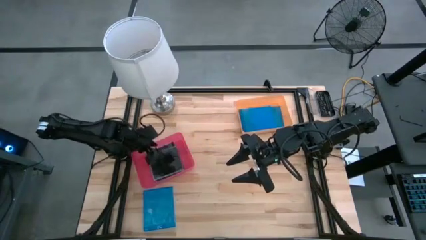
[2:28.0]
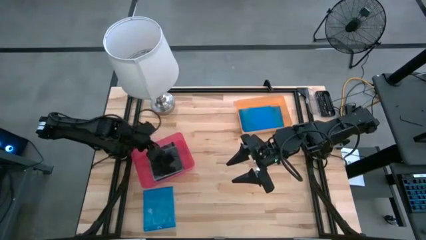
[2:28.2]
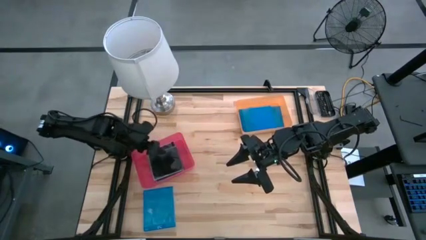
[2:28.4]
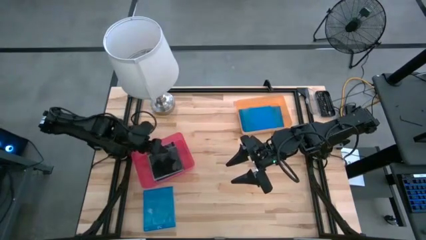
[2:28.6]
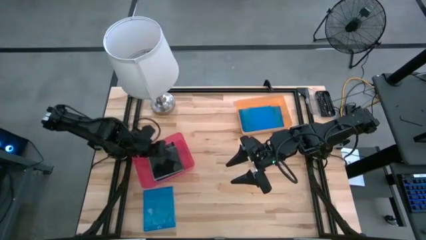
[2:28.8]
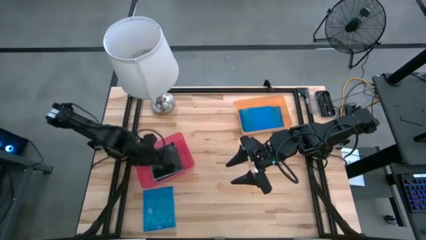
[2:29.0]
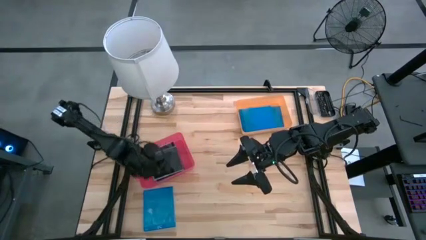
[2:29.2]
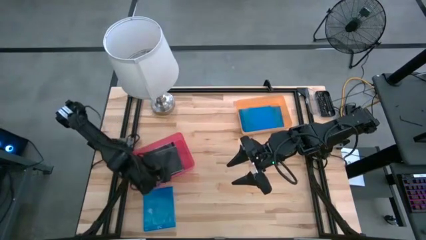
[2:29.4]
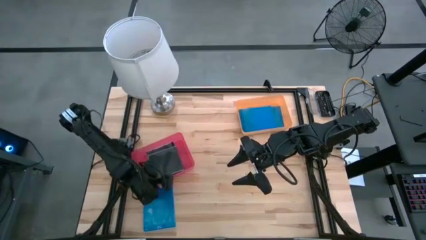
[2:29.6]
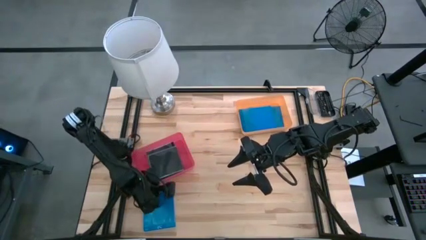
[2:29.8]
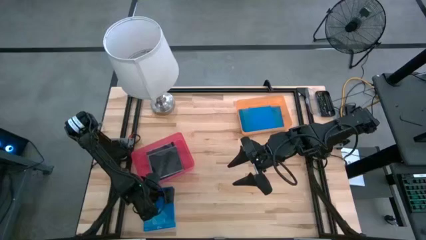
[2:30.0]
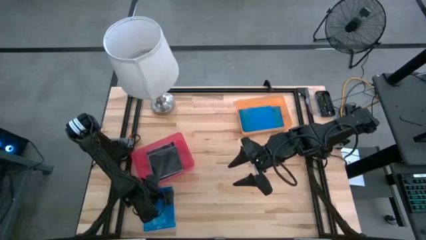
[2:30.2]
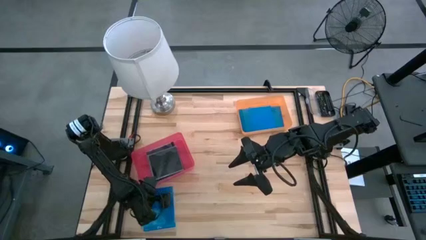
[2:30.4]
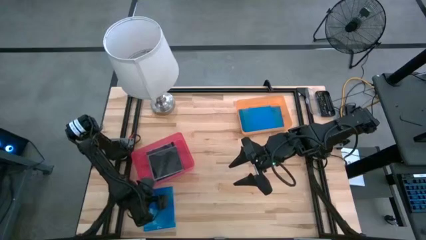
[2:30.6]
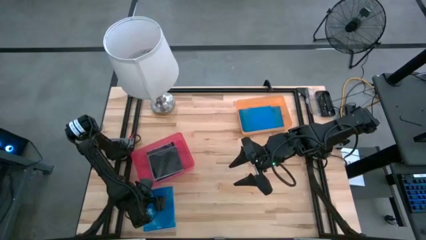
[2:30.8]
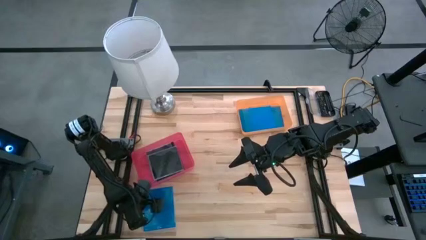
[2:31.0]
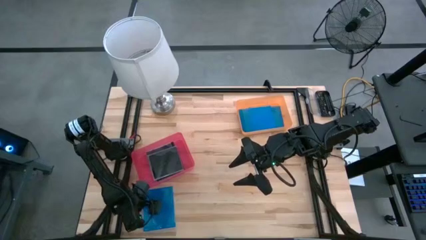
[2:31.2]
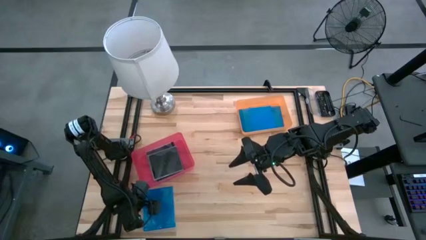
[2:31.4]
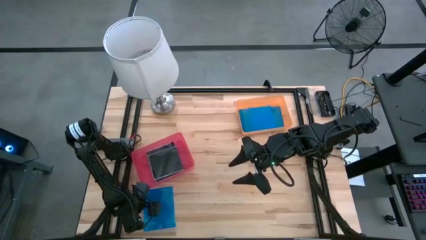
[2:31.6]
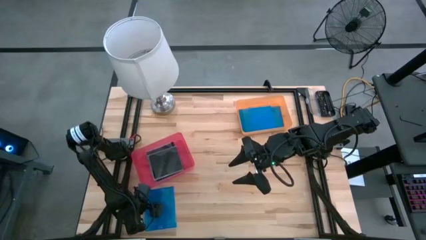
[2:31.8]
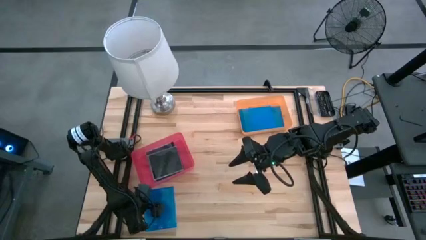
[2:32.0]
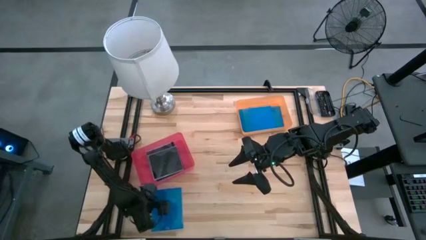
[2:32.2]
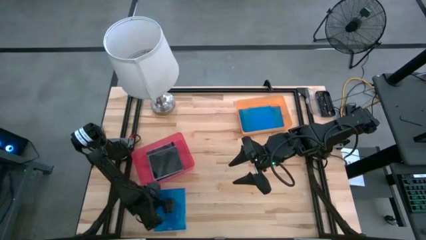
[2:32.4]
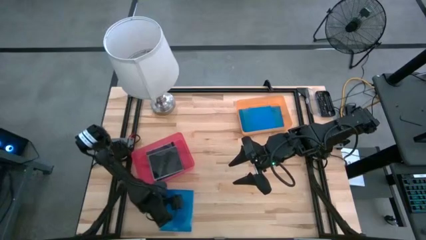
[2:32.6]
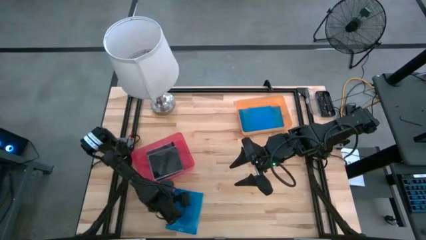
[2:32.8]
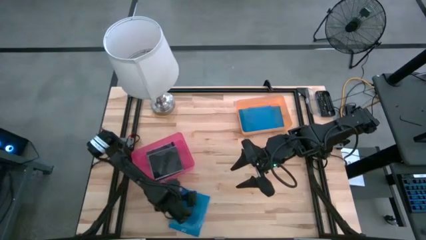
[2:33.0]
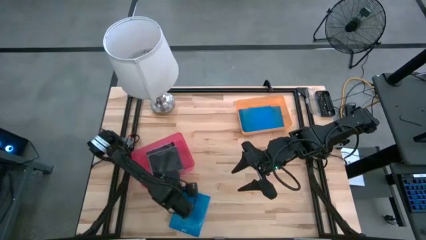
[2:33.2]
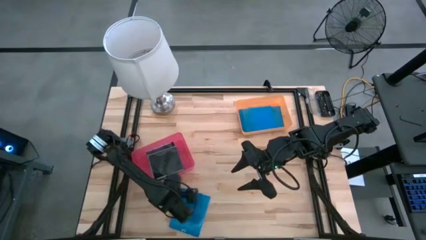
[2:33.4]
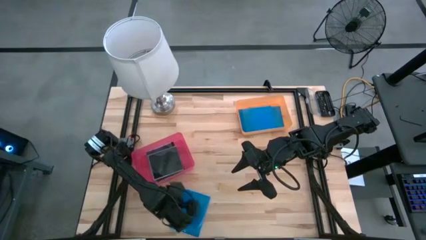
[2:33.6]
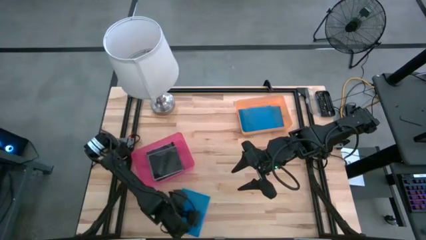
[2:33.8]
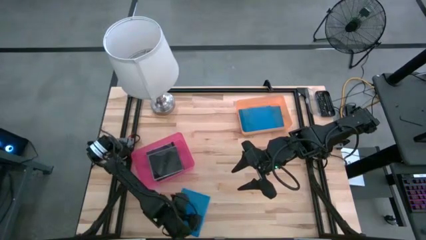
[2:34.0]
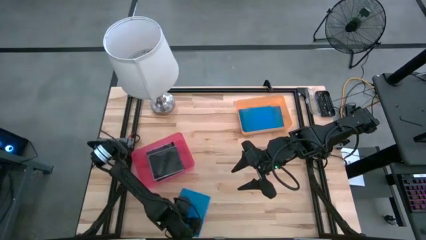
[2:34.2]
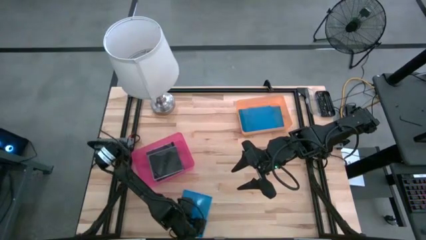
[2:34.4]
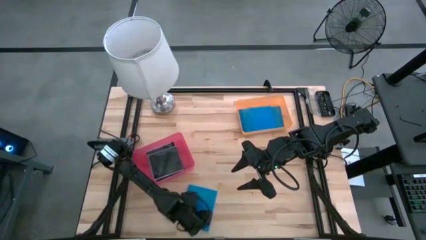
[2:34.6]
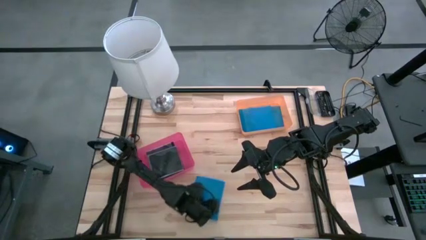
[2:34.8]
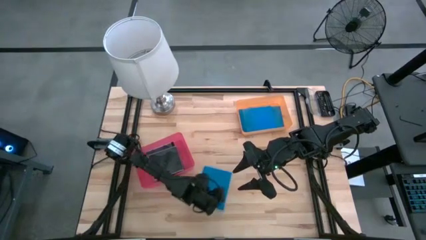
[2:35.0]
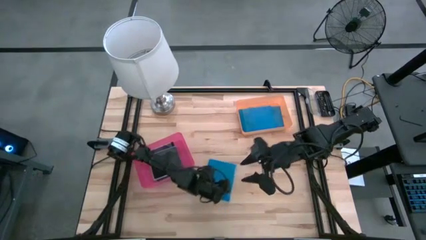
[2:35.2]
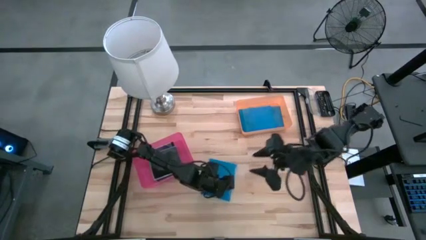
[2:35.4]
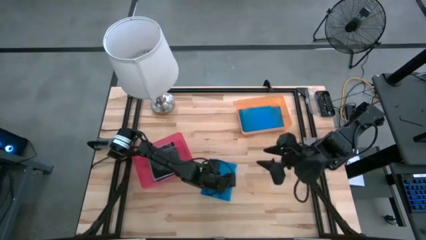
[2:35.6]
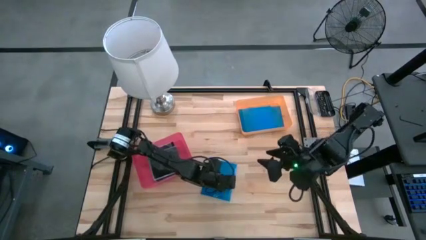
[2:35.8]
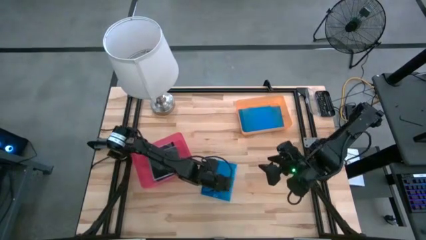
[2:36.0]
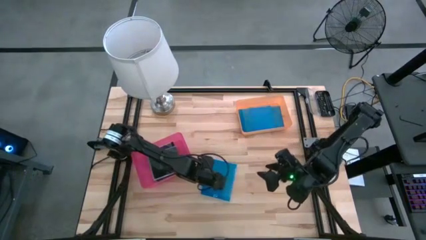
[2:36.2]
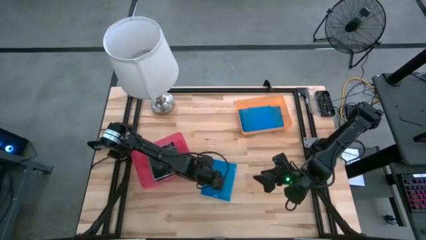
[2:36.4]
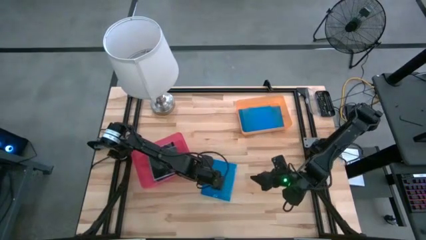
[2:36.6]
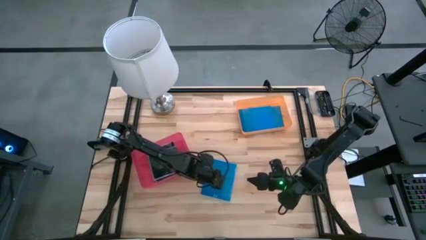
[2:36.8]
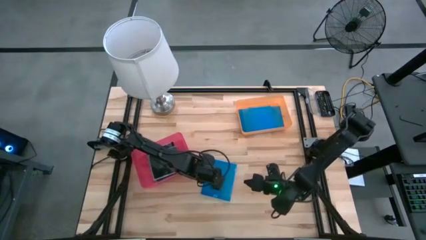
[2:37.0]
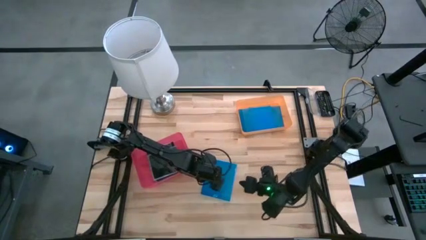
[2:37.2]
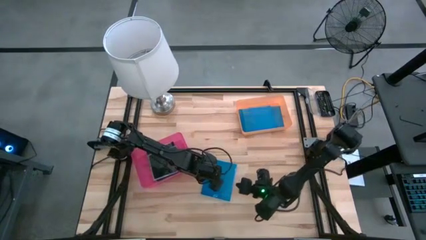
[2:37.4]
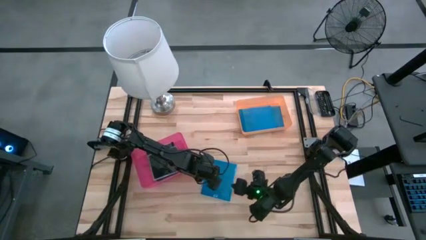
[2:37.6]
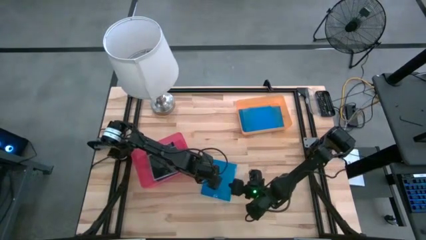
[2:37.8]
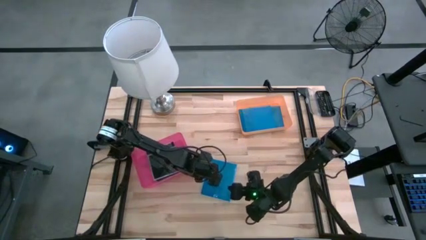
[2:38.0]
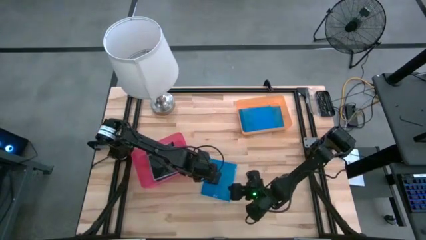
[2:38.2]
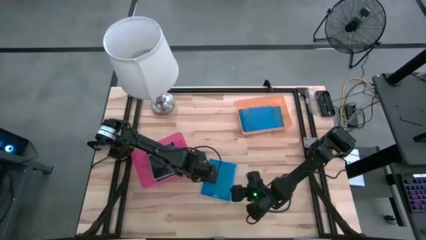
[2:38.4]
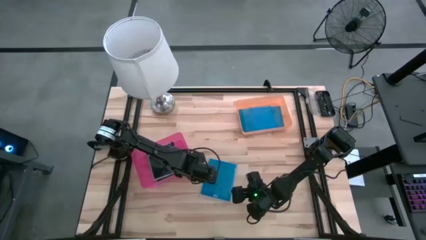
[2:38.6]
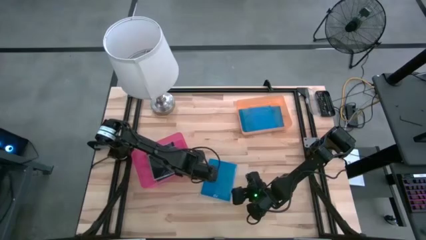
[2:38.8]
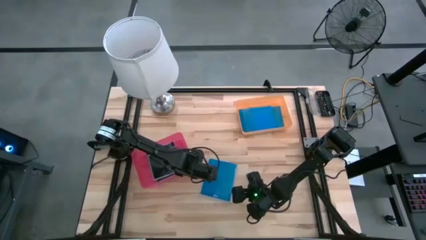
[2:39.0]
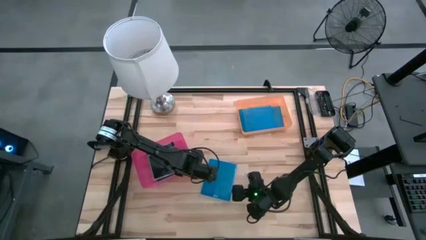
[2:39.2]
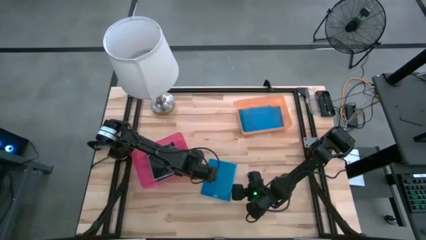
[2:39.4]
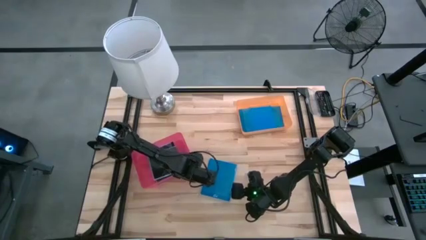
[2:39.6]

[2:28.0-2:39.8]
Task: Pick & place jewel cases by type
Put the blue CD case into the pink bin

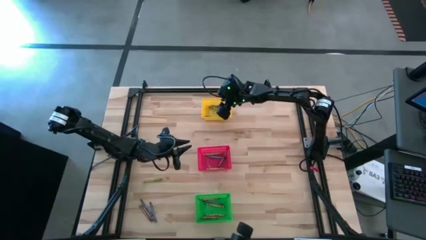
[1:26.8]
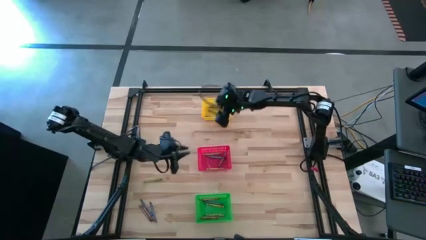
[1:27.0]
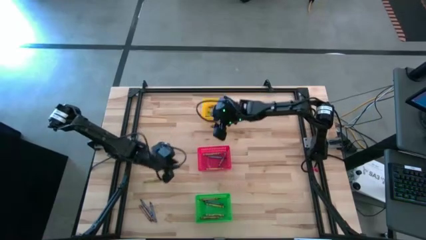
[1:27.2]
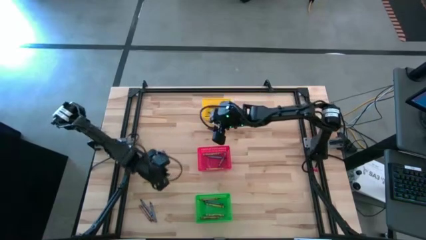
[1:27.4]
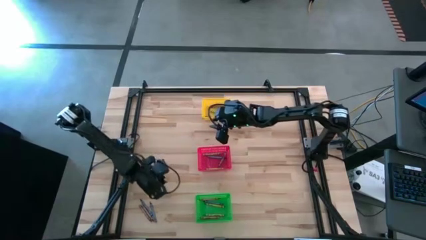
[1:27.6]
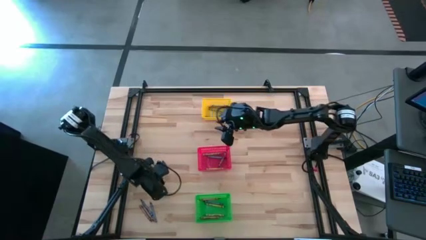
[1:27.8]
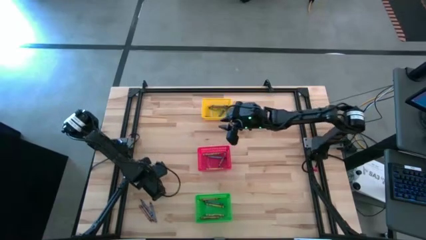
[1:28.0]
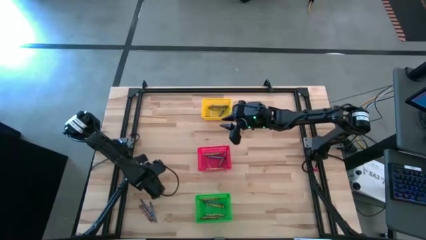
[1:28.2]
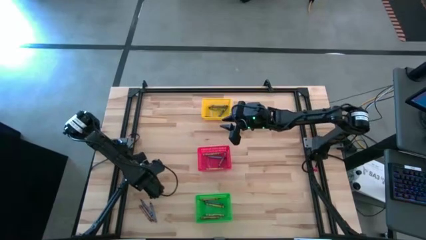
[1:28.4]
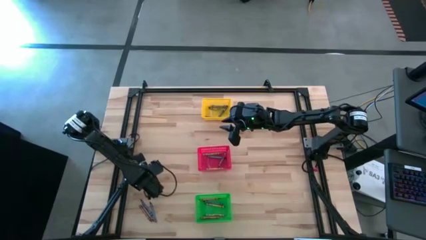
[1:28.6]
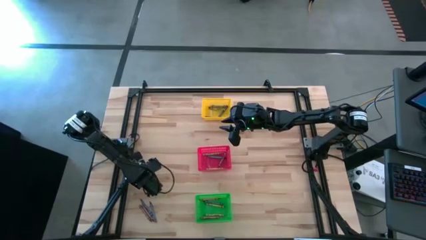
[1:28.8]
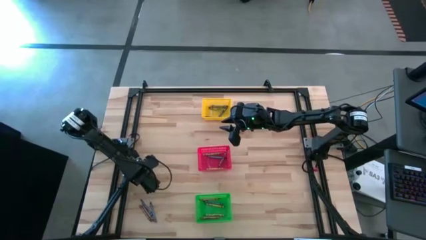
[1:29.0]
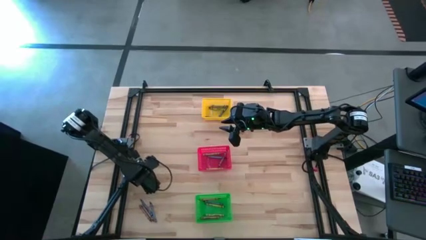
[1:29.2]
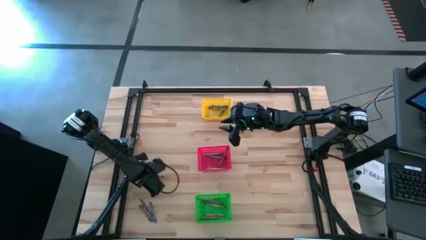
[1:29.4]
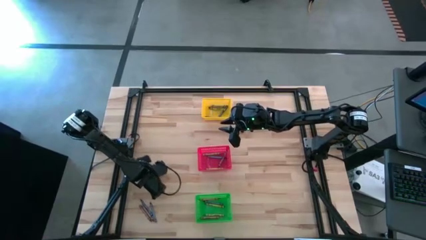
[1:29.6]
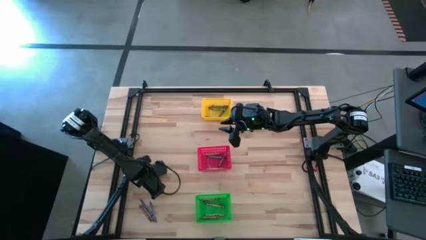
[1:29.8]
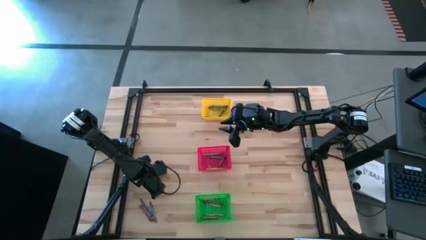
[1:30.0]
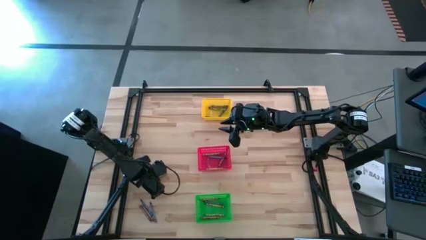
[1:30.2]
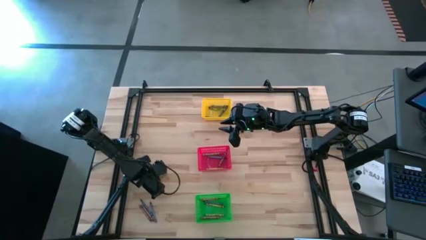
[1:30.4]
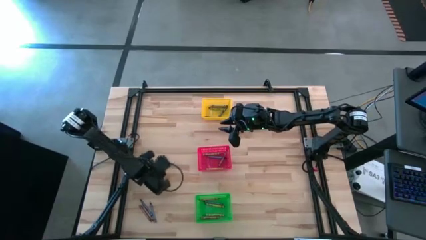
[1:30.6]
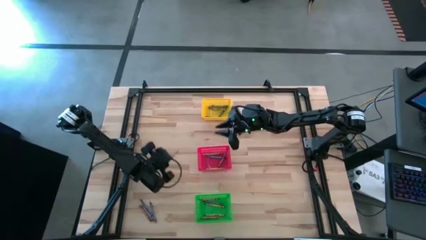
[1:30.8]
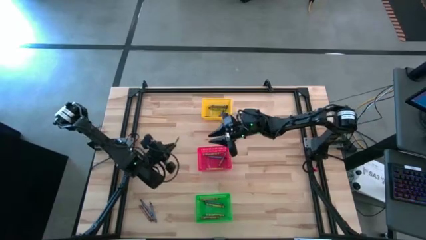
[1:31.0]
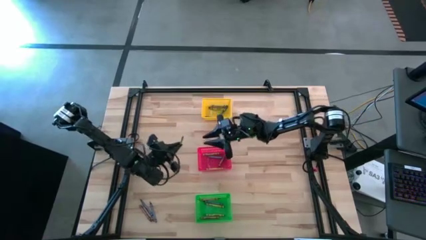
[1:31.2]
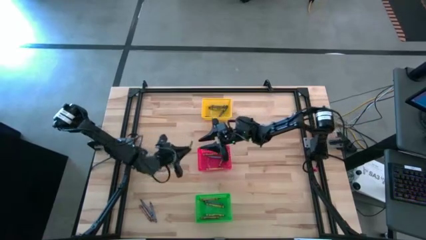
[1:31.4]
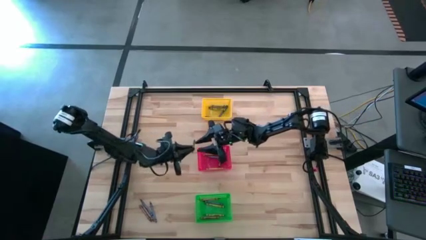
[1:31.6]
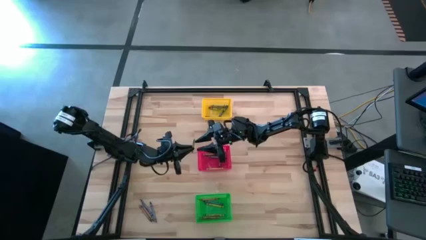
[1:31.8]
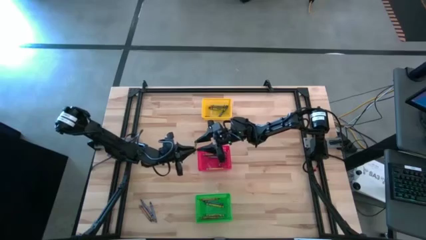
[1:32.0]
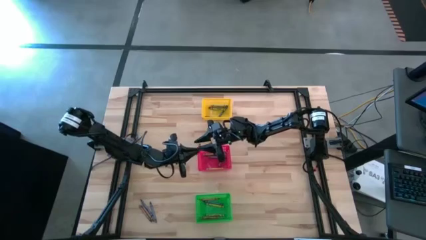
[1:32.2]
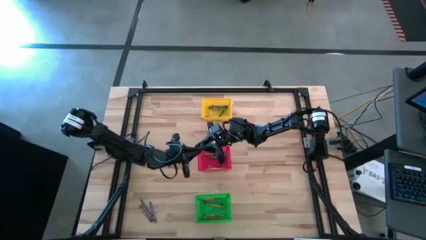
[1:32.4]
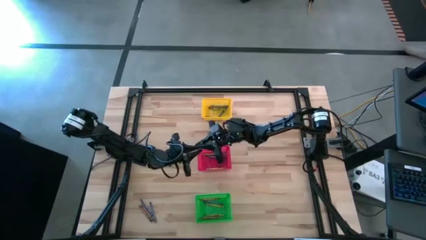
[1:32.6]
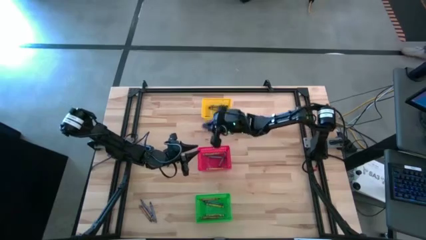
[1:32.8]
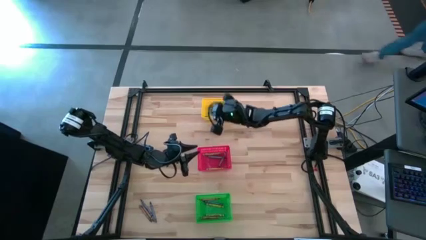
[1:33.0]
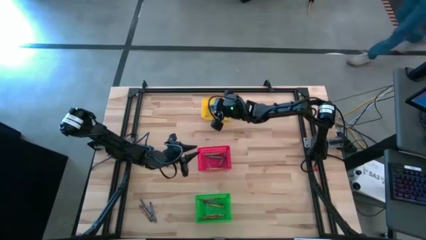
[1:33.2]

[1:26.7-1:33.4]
Task: Sort crayons
Put the green crayon into the yellow bin
